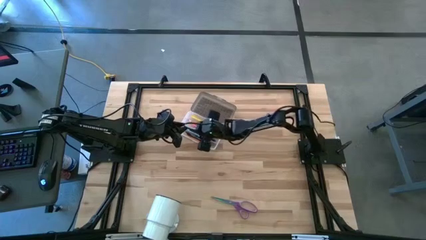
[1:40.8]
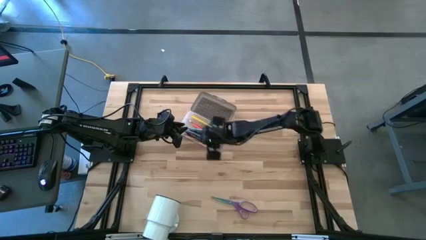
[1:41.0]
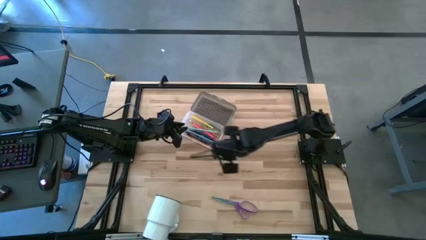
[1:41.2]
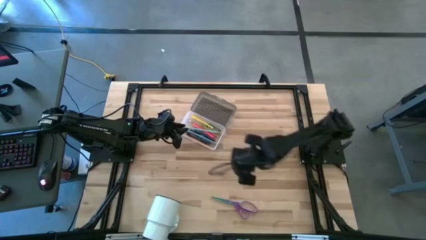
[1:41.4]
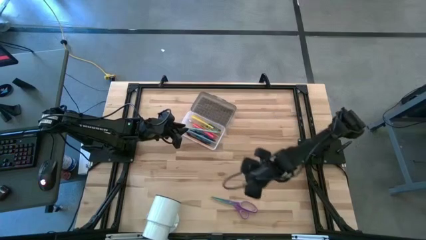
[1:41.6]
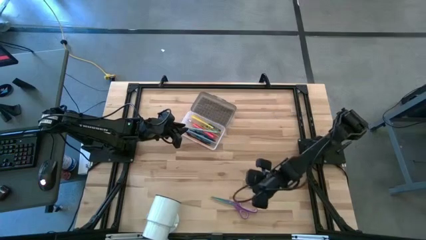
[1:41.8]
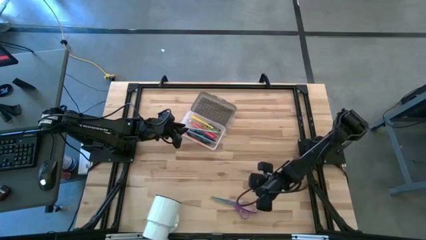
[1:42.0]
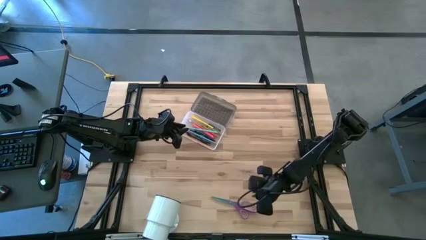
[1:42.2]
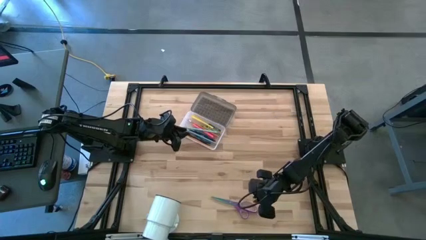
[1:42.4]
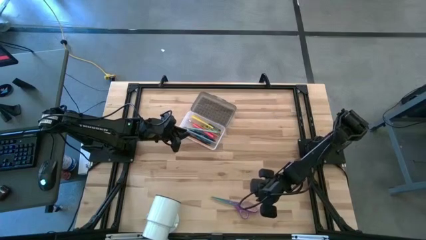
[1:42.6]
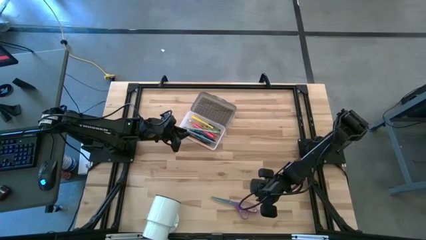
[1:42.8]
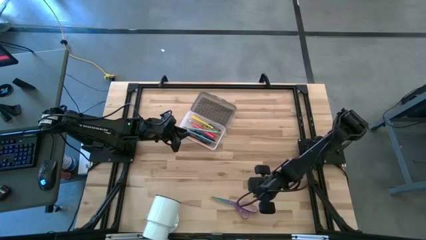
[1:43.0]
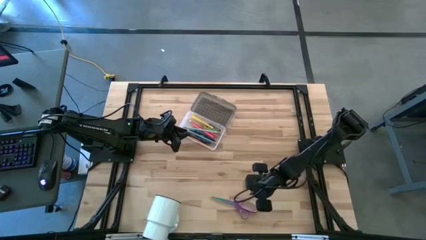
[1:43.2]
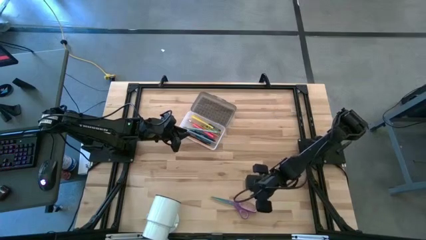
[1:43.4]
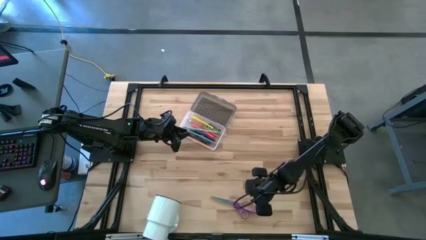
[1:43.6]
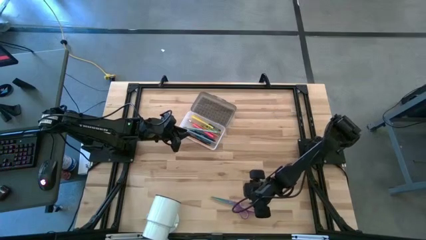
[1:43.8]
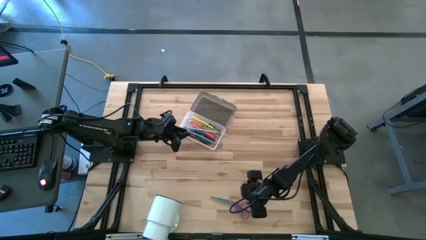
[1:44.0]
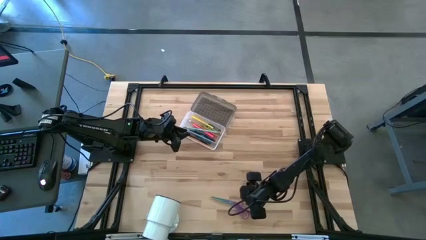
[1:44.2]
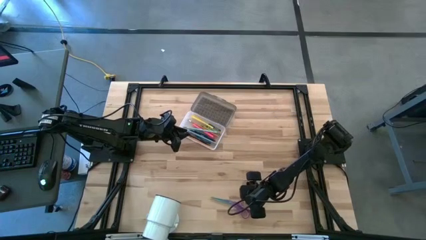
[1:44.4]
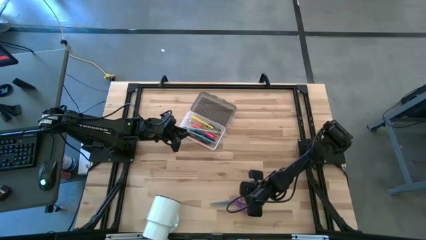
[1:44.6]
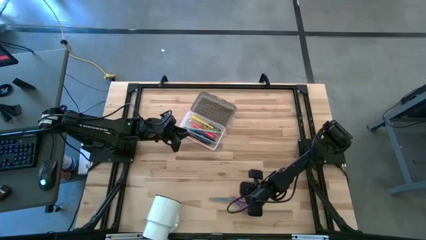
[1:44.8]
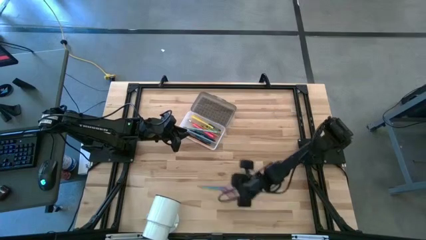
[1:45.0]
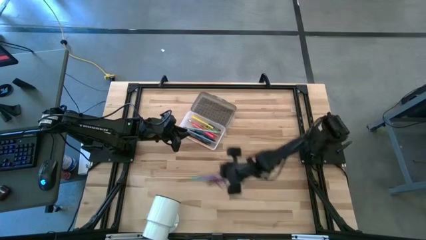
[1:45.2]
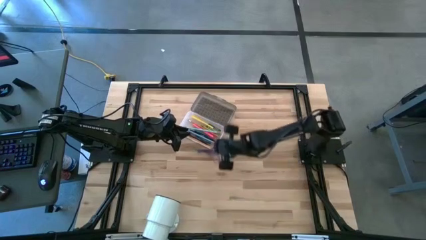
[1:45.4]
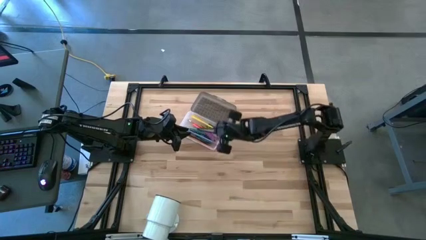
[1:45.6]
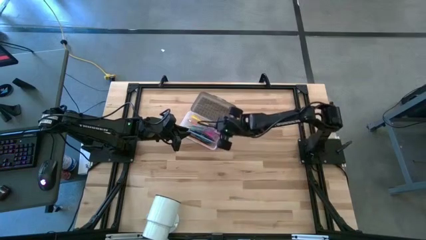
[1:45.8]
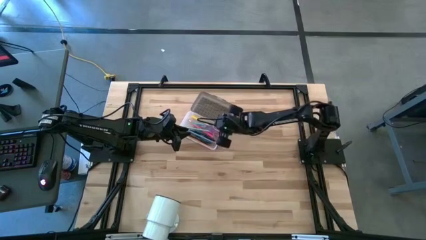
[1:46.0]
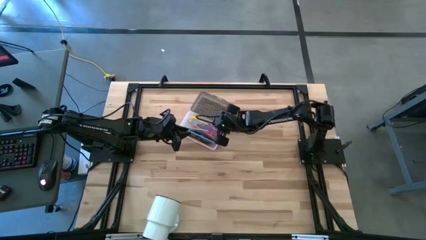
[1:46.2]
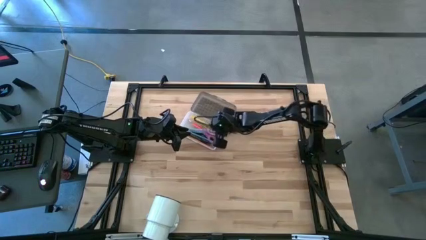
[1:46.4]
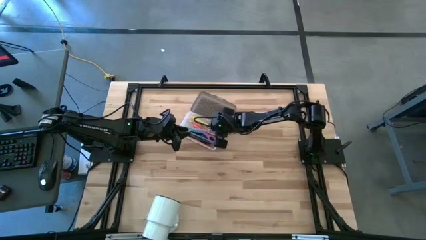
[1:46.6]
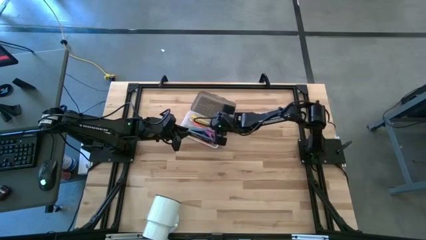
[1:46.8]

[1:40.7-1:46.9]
Task: Pick & place school supplies into a supply box
Put the purple scissors into the supply box

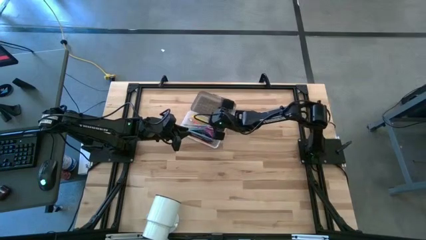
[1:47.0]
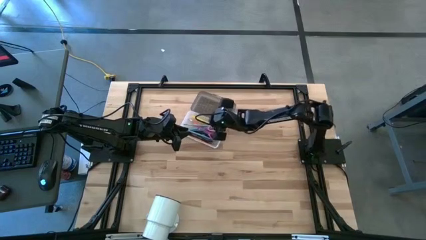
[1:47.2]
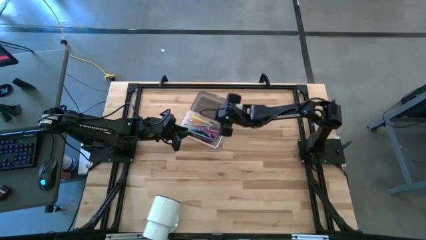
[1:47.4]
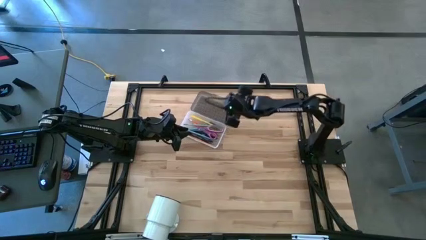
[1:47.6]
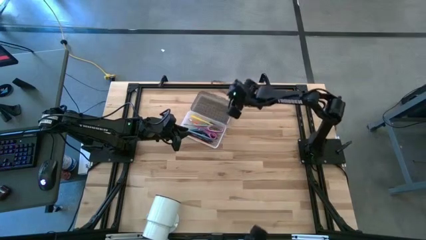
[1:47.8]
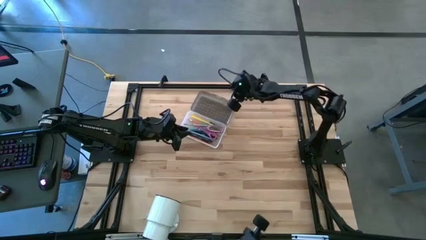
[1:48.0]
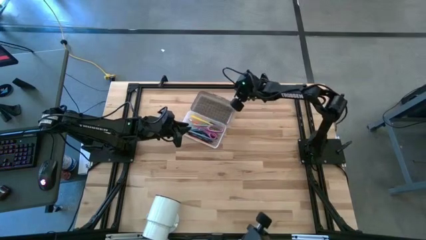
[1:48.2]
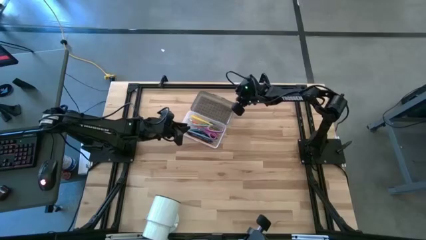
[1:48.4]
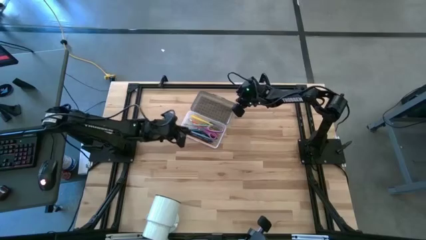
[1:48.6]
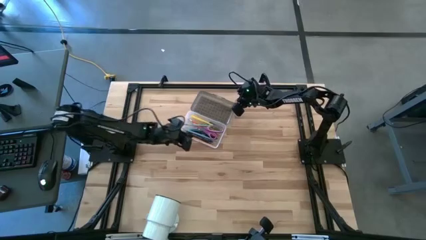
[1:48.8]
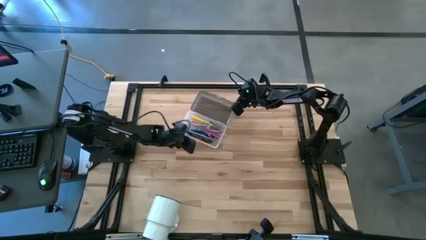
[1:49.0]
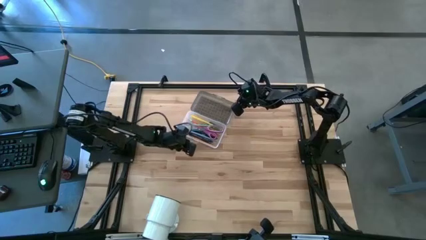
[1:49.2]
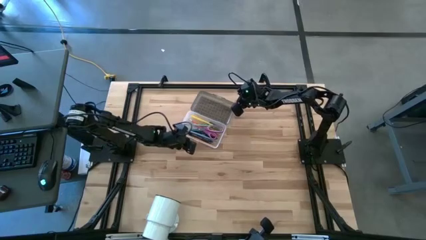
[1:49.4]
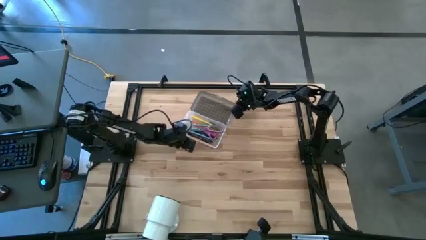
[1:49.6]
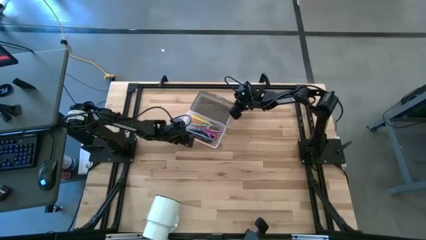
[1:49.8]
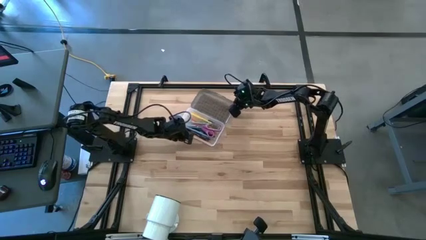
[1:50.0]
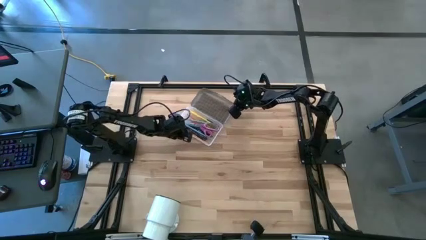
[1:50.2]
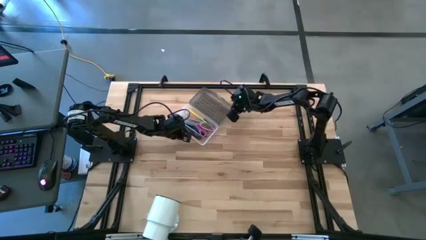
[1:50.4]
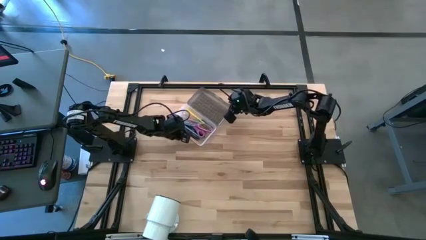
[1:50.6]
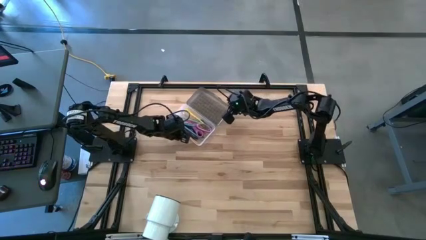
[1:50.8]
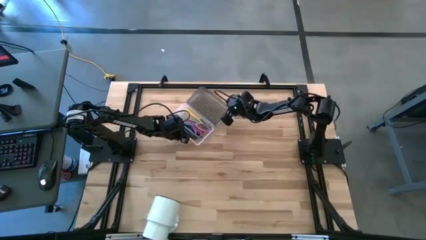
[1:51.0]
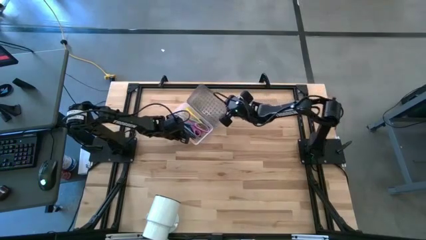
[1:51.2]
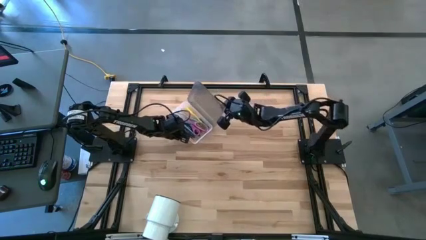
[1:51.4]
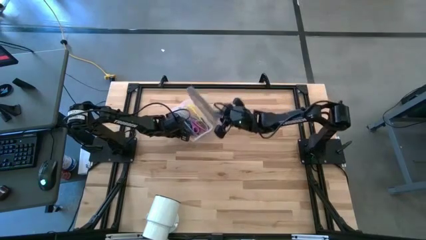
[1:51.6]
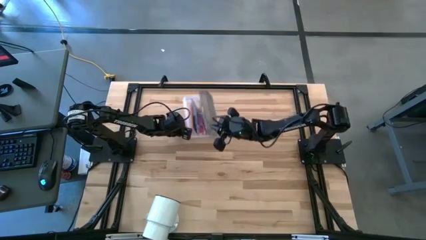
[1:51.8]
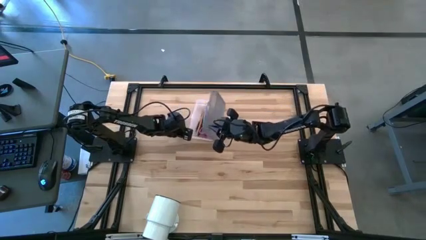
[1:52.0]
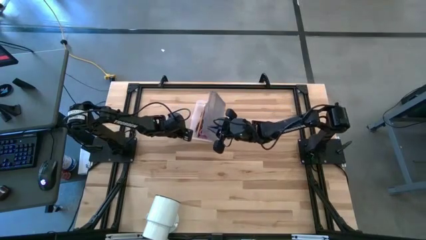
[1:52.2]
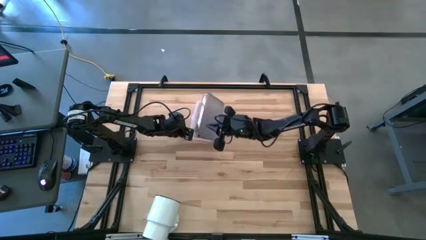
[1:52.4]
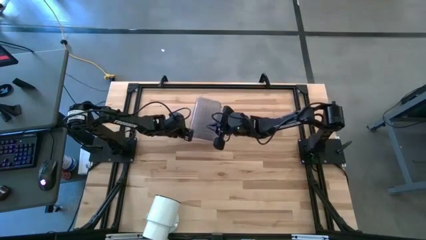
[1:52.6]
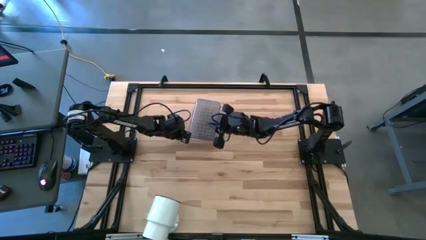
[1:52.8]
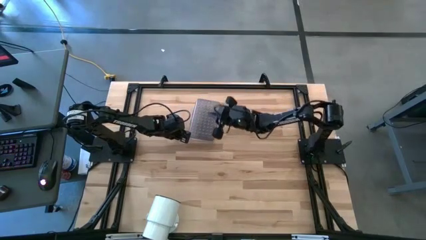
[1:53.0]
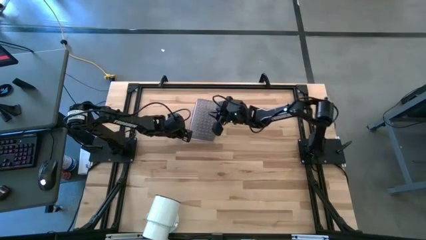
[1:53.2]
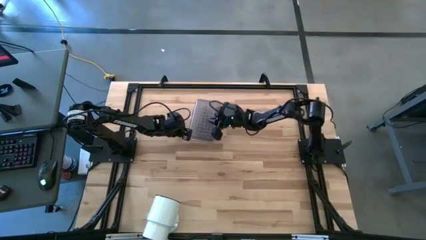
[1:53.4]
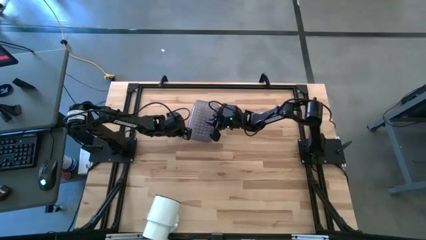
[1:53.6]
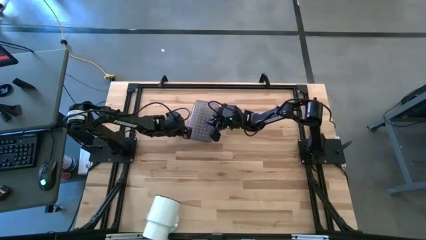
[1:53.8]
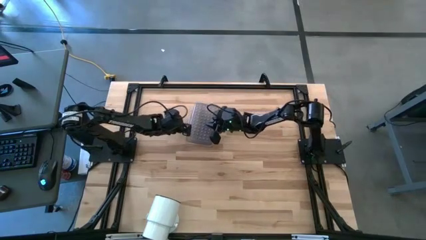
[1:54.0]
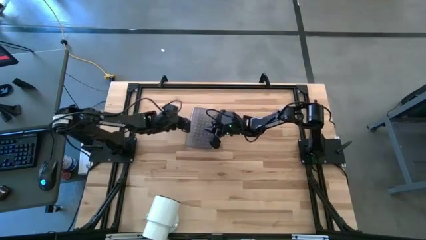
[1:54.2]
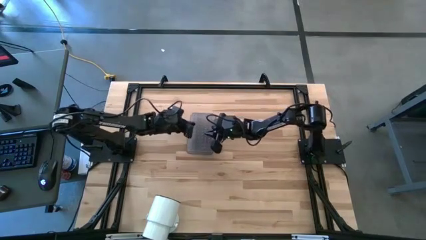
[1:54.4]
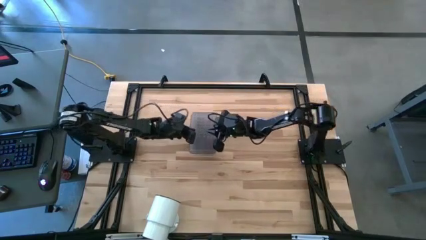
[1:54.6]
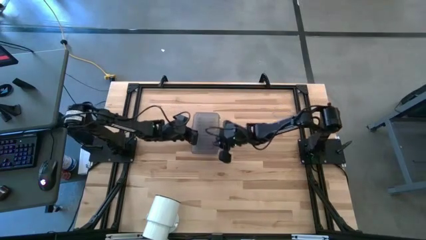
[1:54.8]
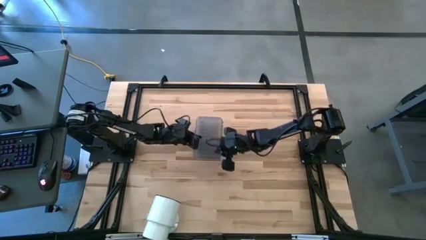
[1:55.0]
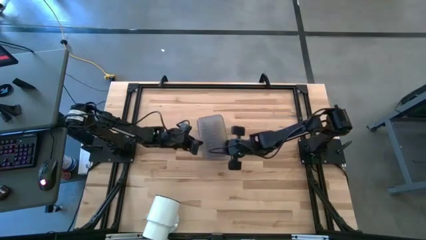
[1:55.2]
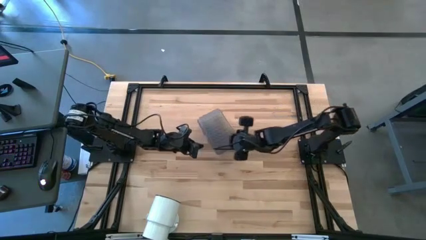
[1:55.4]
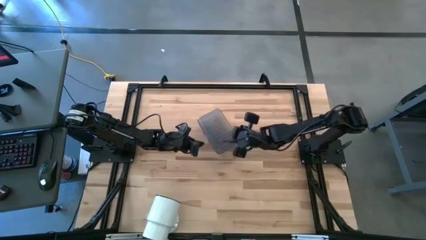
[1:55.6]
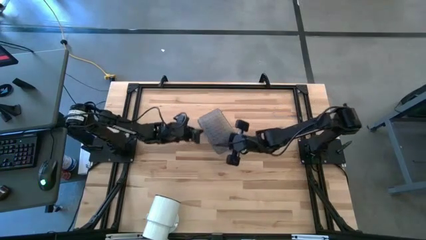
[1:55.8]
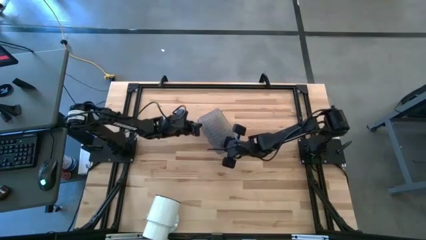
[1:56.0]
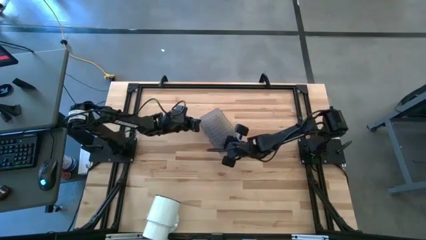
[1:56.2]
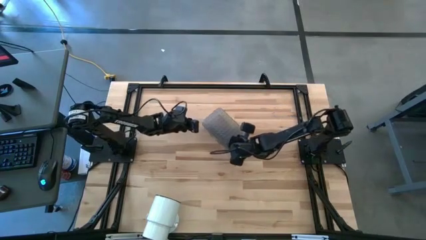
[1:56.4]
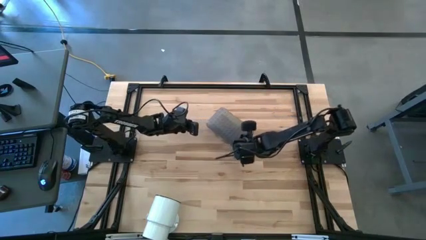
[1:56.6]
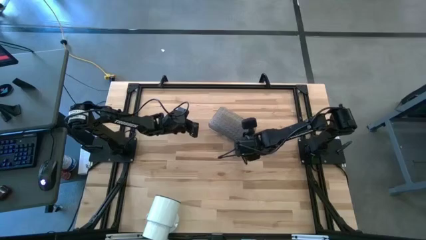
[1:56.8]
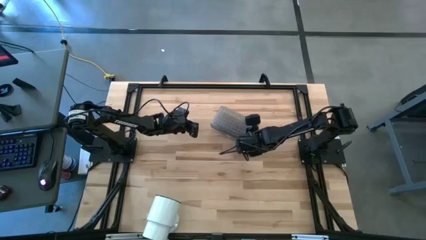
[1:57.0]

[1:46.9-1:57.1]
Close the supply box
